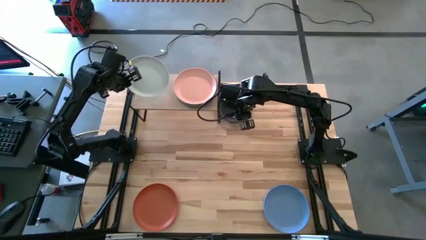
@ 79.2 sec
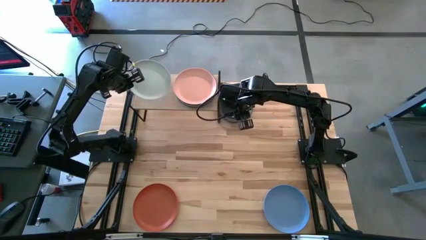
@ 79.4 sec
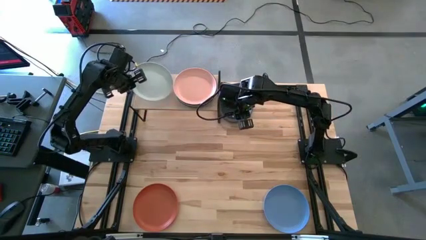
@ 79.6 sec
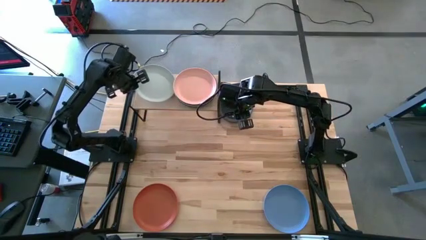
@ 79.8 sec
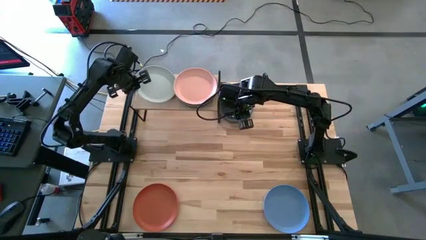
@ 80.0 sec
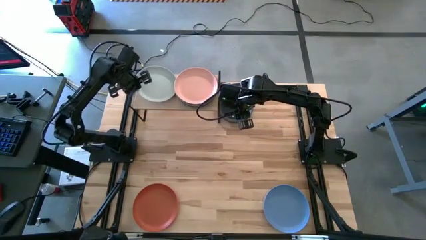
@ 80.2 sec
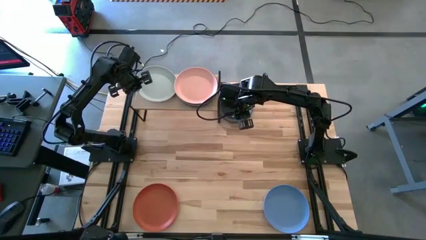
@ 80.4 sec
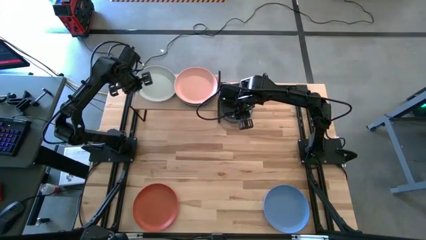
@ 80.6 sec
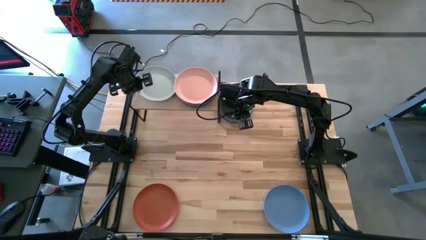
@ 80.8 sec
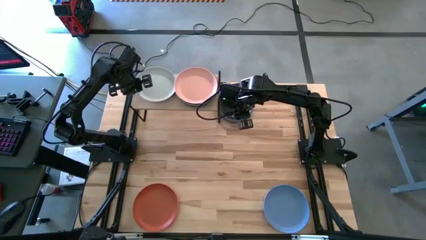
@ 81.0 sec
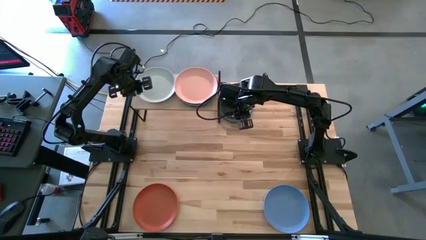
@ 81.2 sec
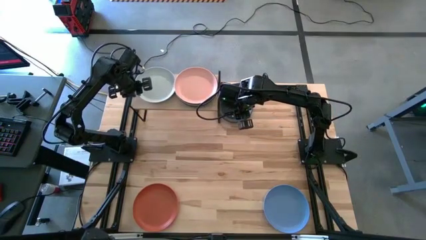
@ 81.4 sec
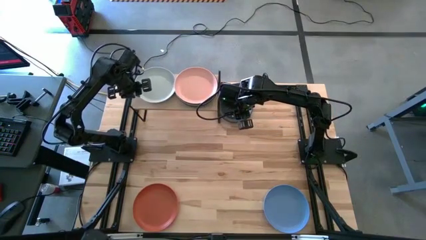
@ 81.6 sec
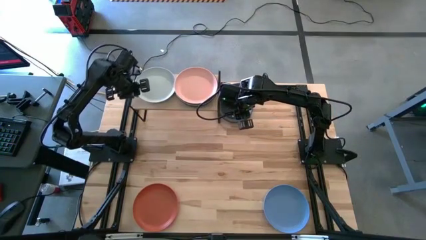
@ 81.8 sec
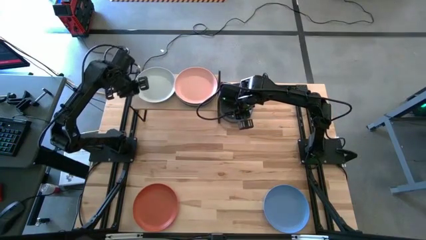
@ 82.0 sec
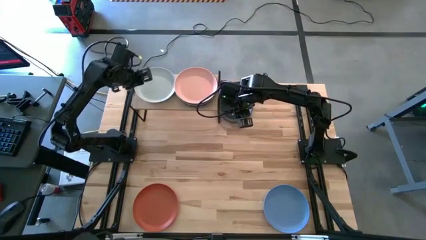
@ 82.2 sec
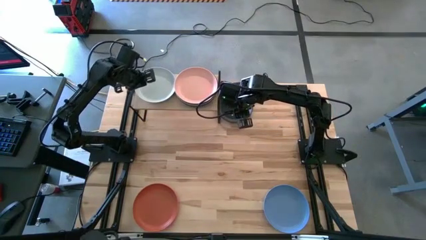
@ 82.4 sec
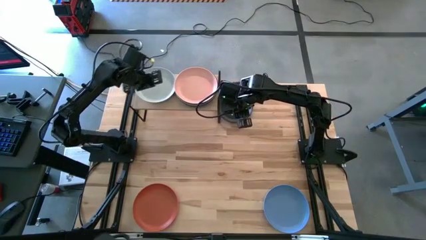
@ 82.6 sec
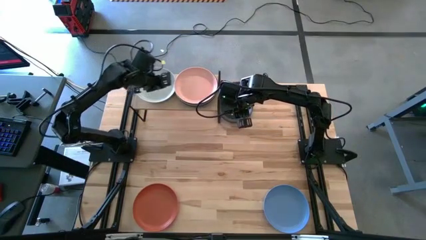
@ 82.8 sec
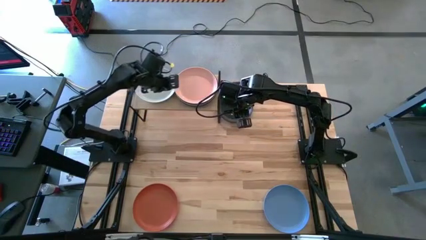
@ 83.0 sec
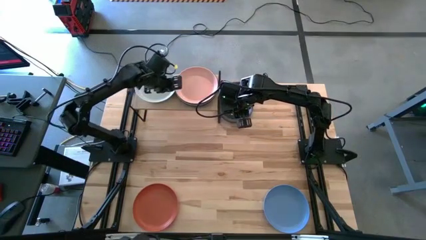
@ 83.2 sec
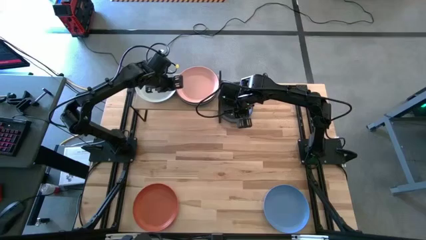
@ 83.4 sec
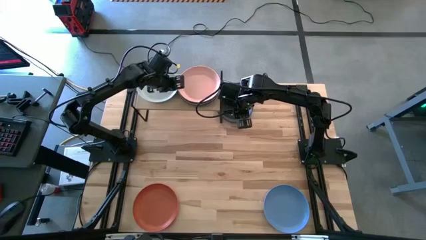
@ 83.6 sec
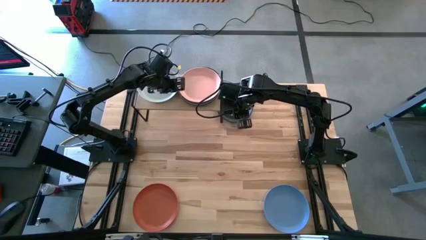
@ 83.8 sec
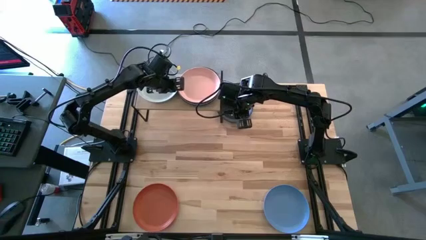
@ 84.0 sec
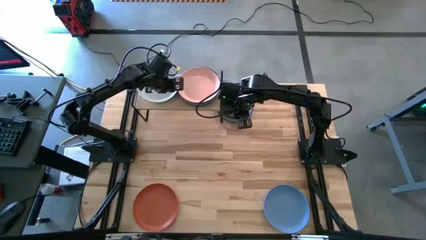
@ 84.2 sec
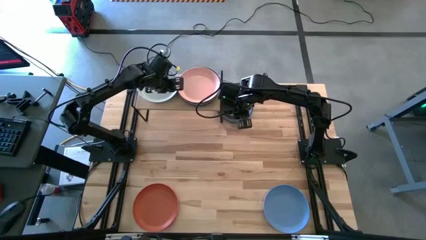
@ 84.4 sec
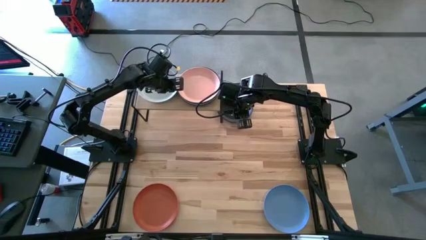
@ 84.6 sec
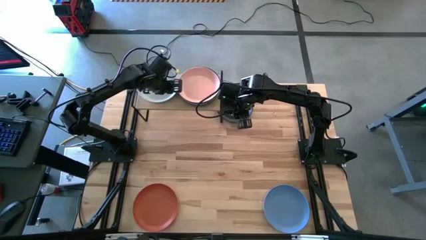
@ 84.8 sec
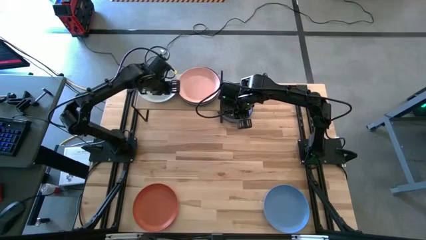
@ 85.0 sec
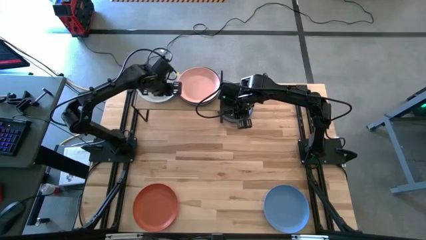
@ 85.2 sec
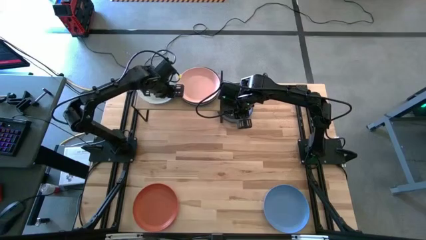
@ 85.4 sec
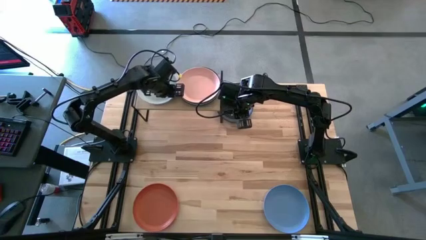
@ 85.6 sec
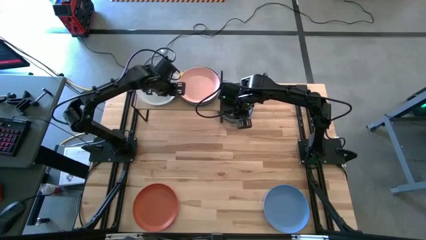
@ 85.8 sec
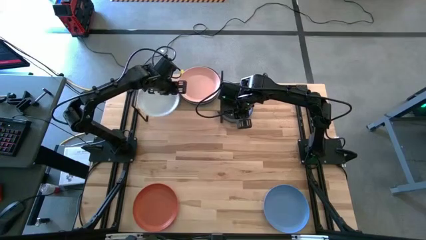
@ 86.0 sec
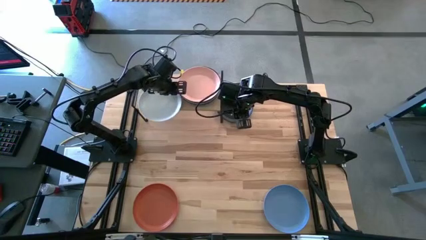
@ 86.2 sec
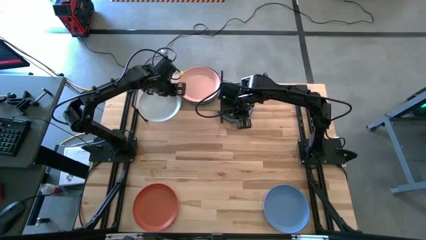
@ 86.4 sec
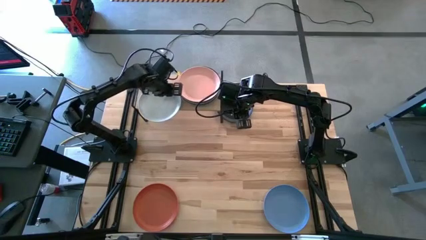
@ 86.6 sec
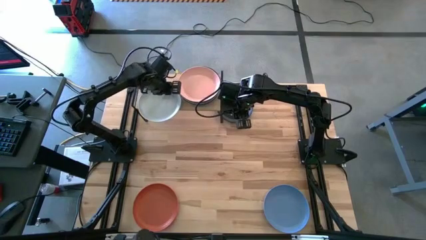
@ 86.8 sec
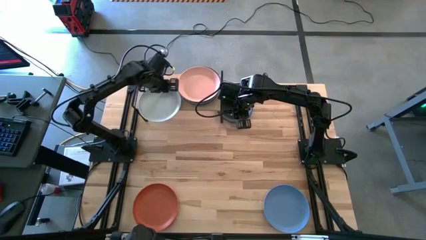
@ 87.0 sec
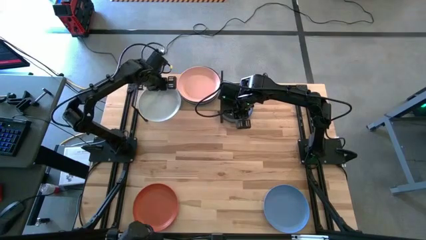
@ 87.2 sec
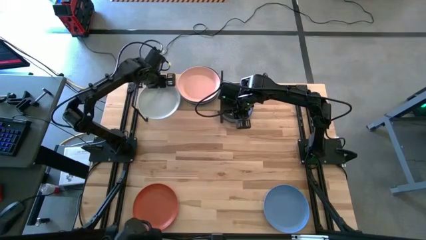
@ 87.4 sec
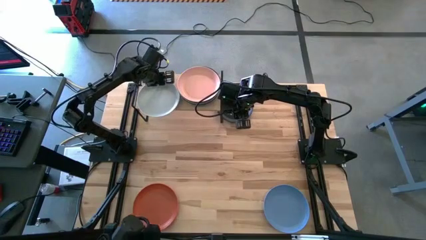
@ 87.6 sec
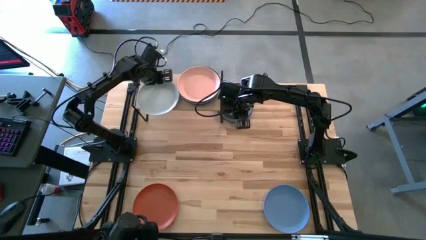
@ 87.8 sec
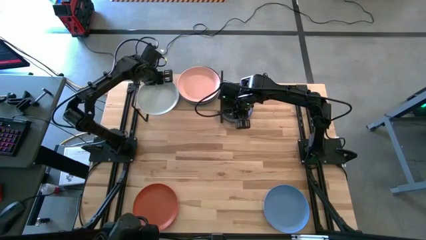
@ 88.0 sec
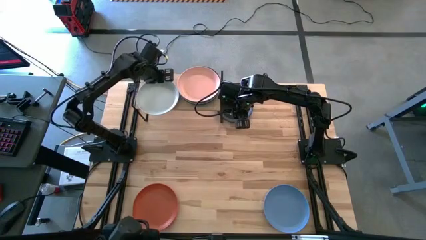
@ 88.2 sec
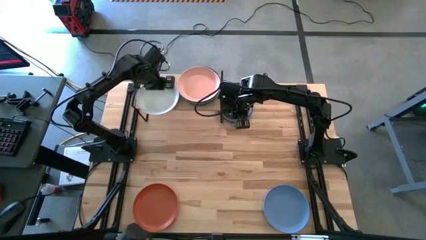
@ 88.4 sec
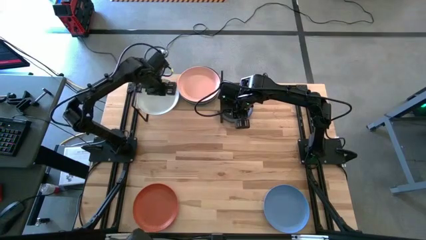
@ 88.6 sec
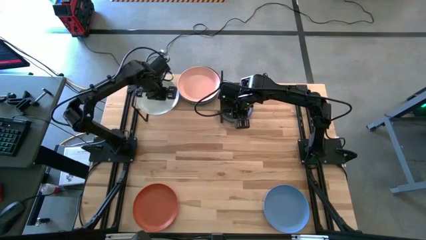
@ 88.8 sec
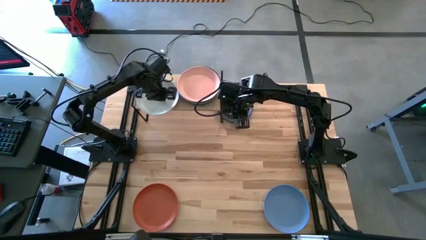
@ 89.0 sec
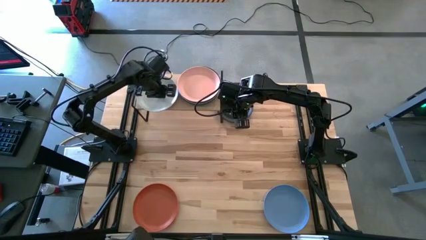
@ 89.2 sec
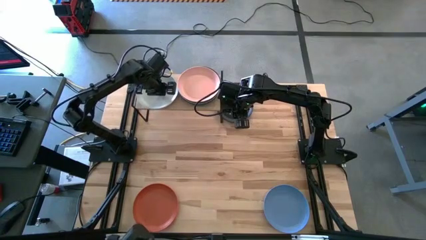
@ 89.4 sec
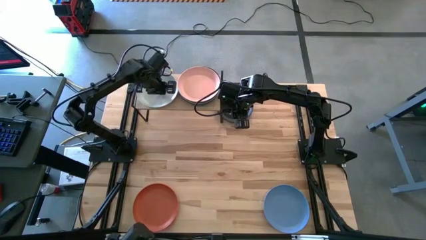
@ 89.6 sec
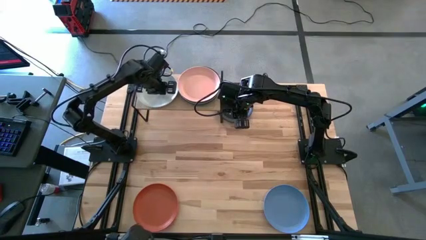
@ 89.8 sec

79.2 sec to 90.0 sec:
Task: Place and stack plates onto a shelf
Put the white plate on the shelf
